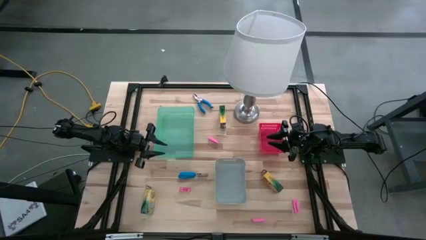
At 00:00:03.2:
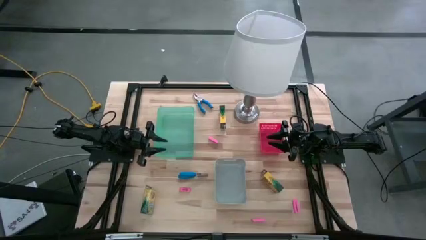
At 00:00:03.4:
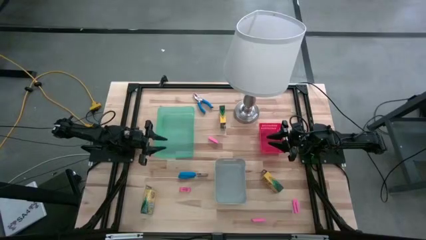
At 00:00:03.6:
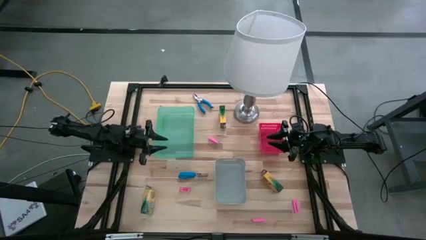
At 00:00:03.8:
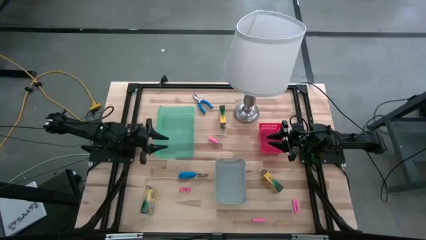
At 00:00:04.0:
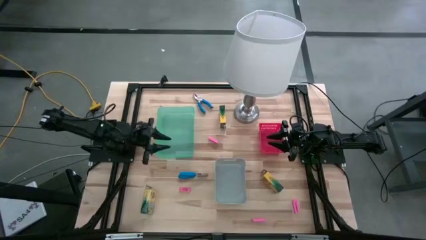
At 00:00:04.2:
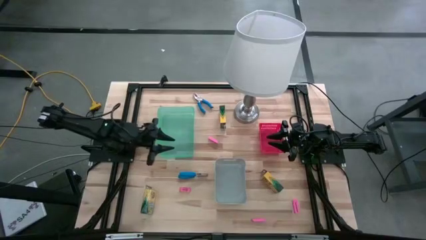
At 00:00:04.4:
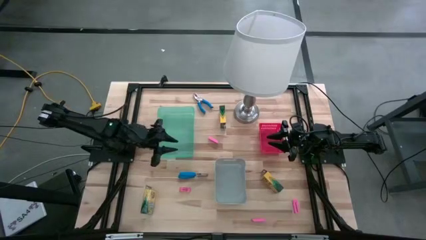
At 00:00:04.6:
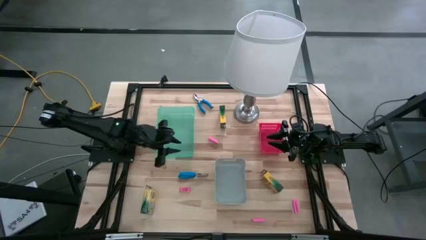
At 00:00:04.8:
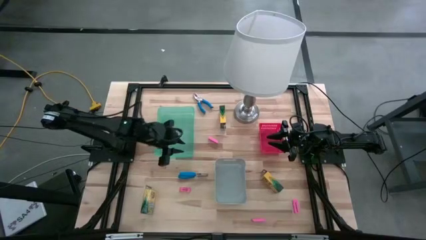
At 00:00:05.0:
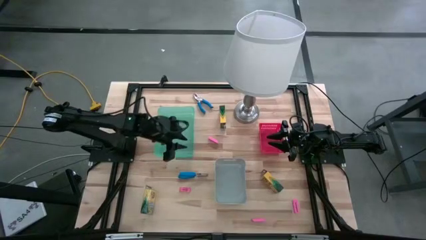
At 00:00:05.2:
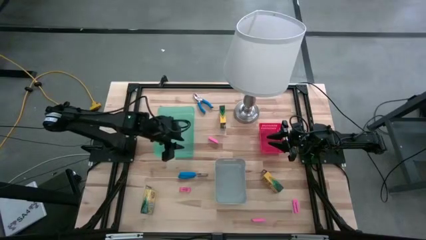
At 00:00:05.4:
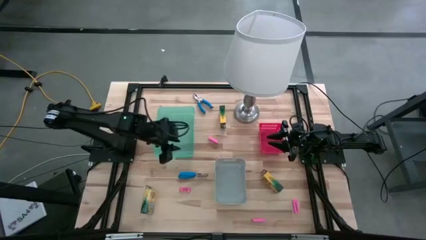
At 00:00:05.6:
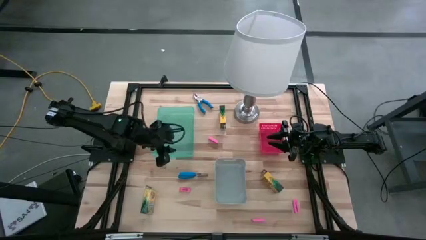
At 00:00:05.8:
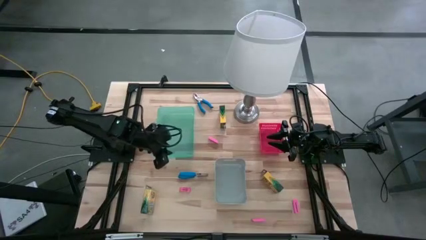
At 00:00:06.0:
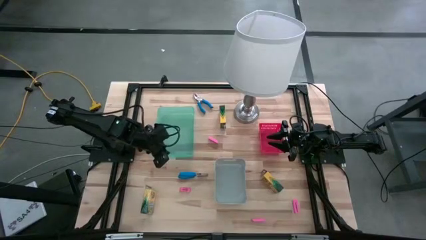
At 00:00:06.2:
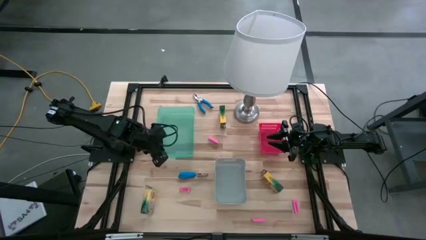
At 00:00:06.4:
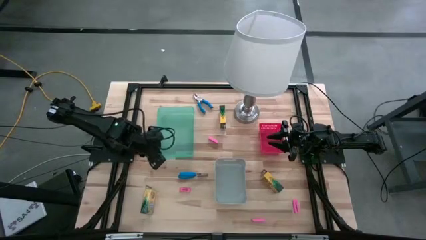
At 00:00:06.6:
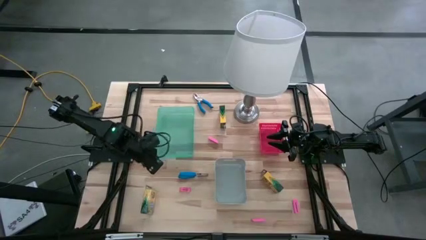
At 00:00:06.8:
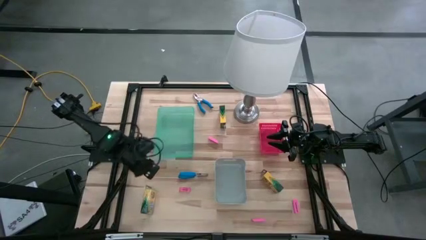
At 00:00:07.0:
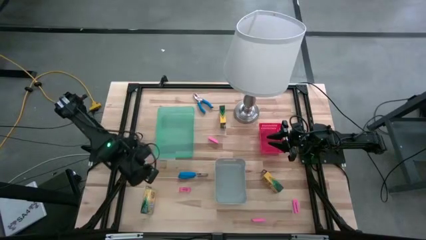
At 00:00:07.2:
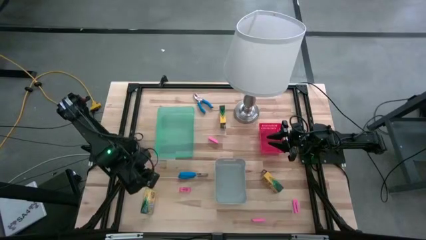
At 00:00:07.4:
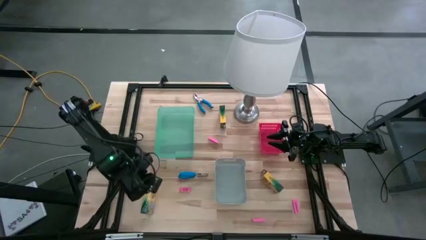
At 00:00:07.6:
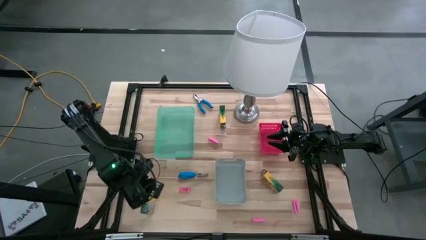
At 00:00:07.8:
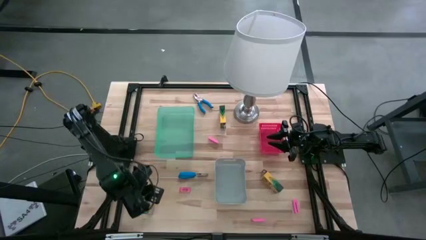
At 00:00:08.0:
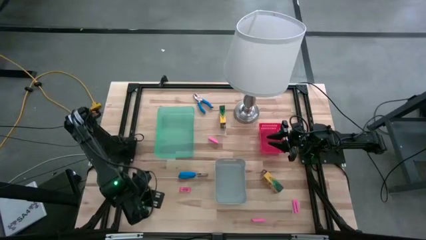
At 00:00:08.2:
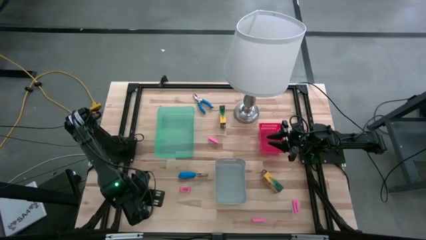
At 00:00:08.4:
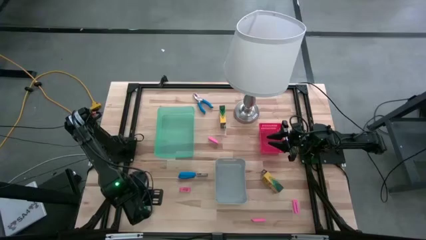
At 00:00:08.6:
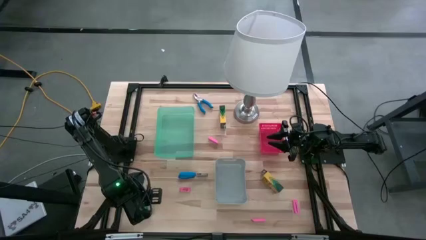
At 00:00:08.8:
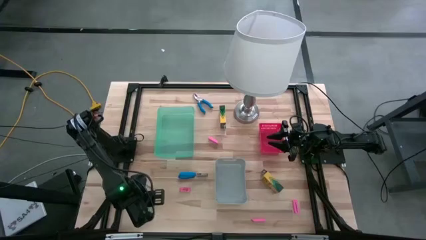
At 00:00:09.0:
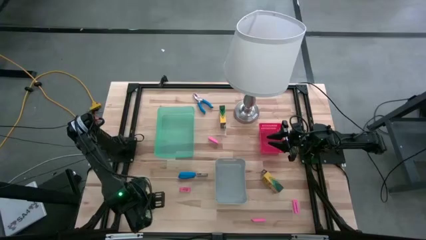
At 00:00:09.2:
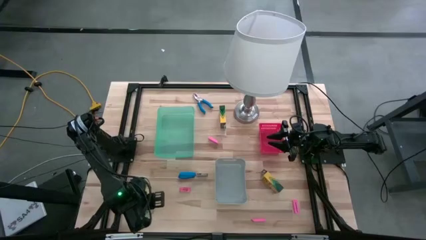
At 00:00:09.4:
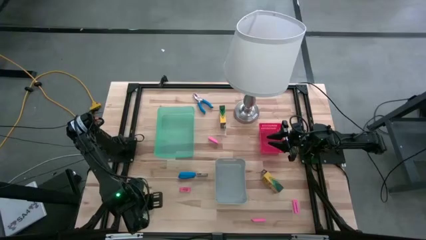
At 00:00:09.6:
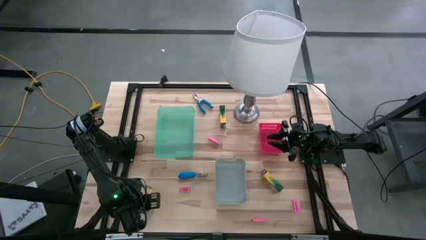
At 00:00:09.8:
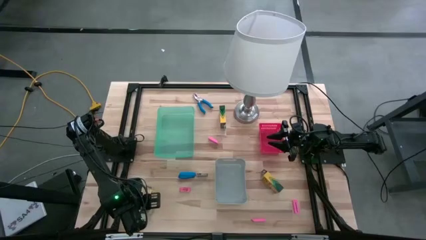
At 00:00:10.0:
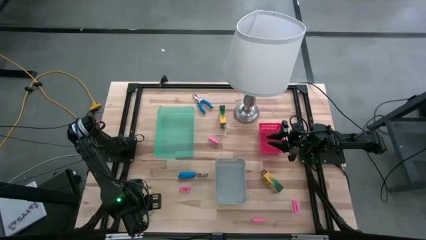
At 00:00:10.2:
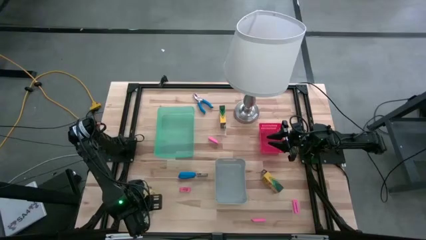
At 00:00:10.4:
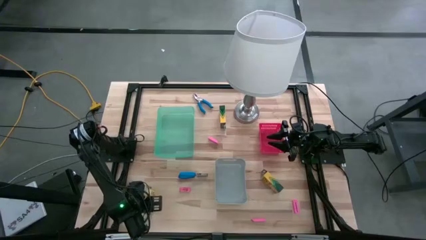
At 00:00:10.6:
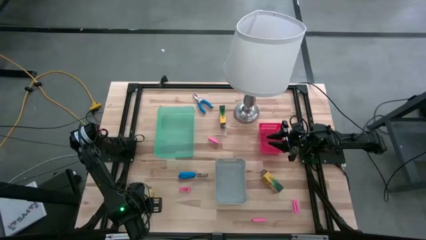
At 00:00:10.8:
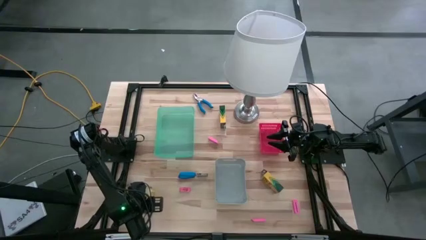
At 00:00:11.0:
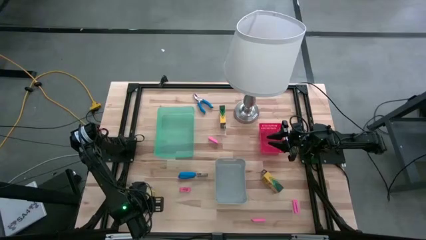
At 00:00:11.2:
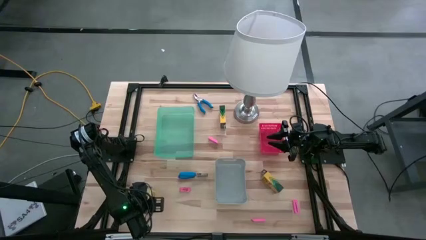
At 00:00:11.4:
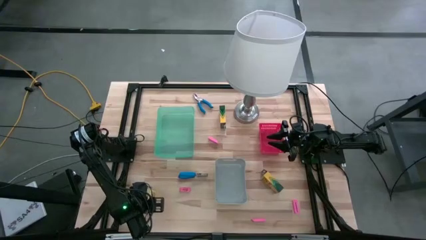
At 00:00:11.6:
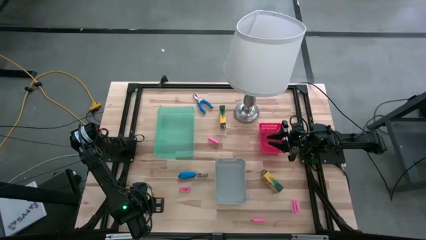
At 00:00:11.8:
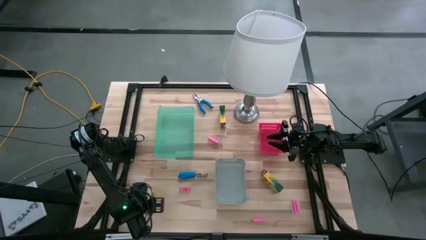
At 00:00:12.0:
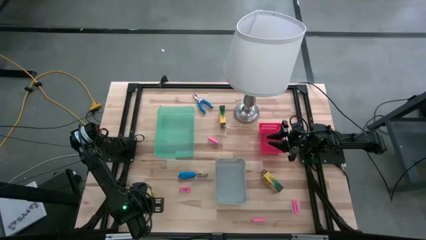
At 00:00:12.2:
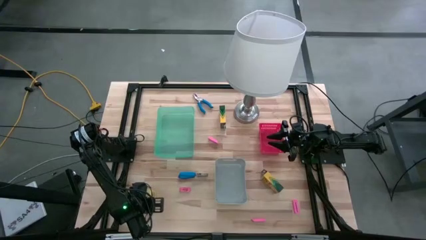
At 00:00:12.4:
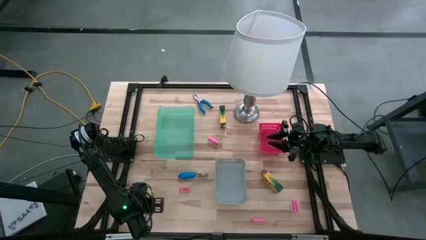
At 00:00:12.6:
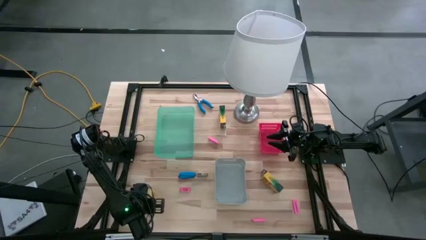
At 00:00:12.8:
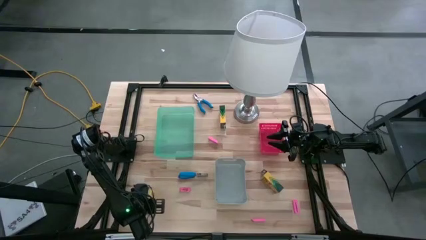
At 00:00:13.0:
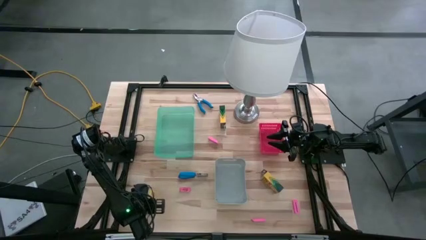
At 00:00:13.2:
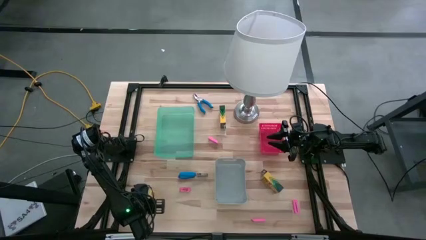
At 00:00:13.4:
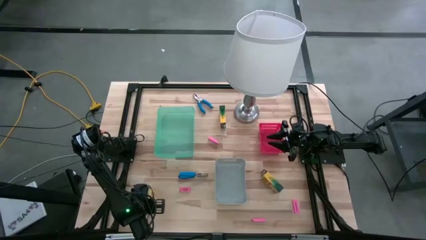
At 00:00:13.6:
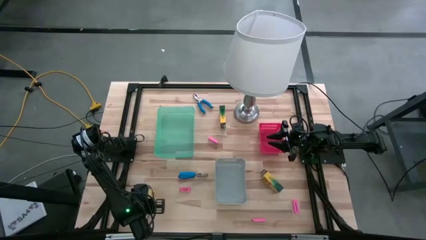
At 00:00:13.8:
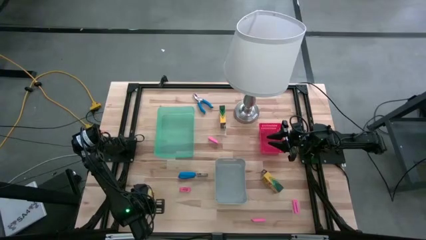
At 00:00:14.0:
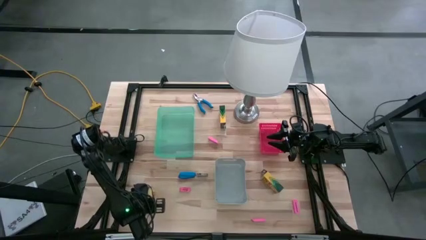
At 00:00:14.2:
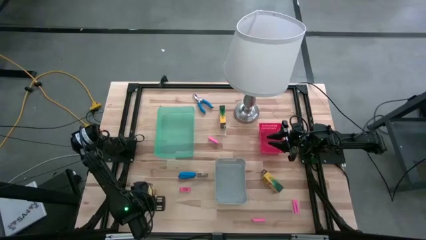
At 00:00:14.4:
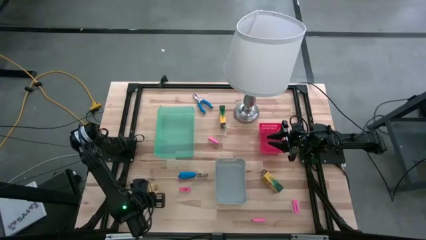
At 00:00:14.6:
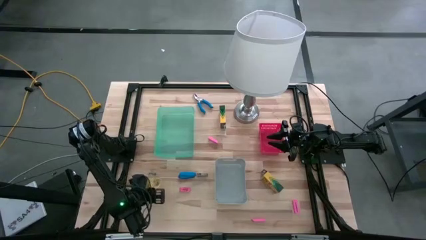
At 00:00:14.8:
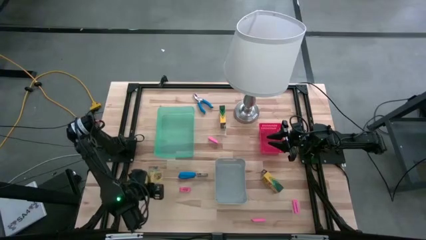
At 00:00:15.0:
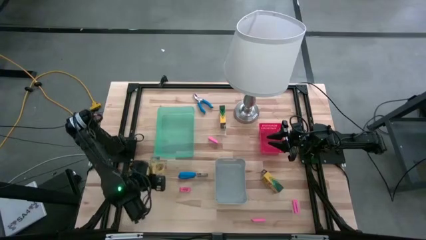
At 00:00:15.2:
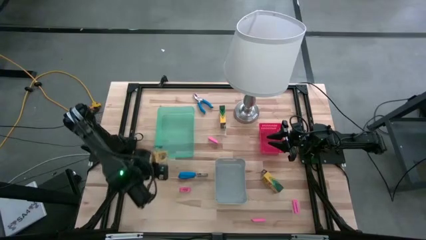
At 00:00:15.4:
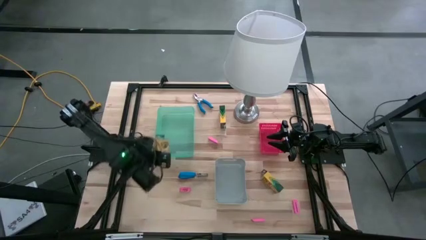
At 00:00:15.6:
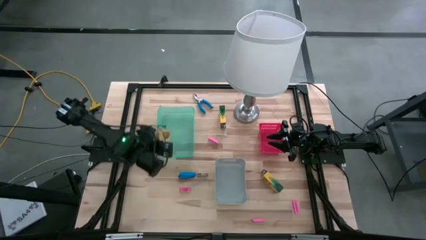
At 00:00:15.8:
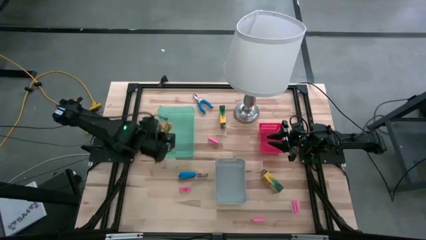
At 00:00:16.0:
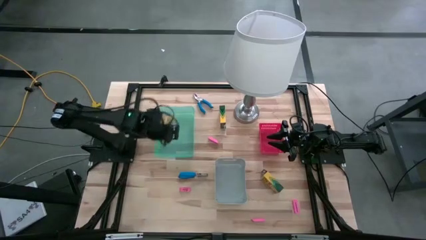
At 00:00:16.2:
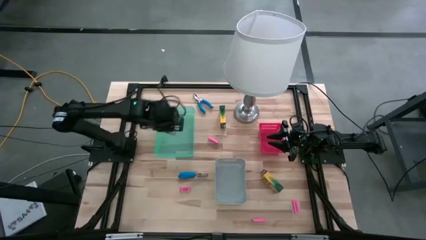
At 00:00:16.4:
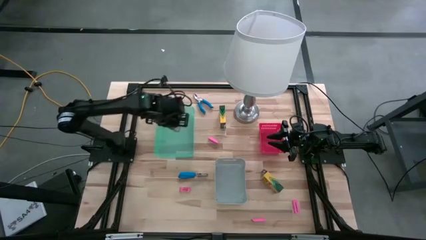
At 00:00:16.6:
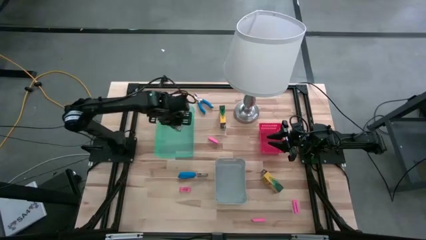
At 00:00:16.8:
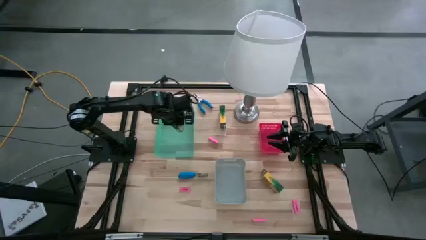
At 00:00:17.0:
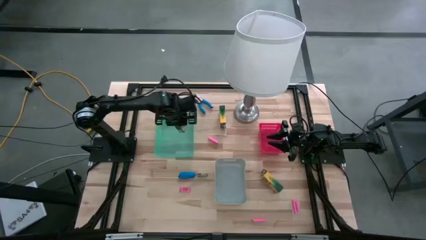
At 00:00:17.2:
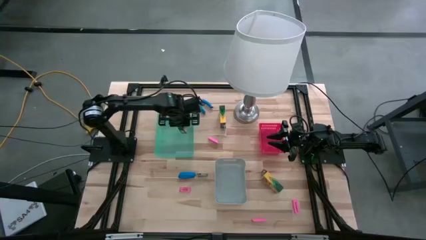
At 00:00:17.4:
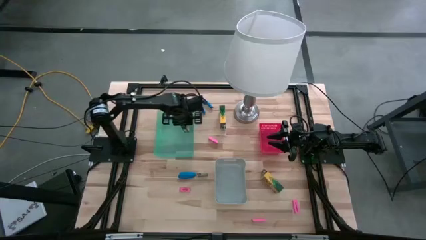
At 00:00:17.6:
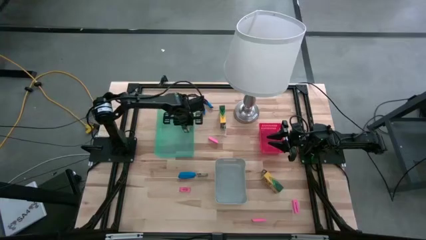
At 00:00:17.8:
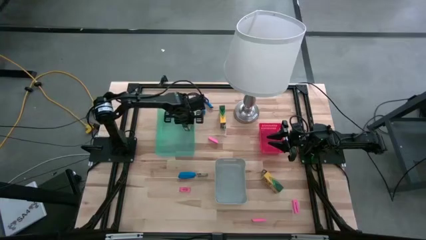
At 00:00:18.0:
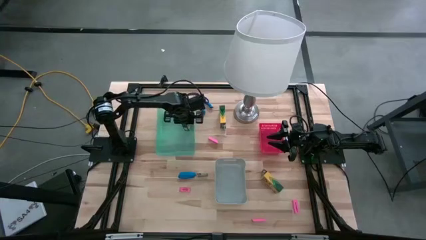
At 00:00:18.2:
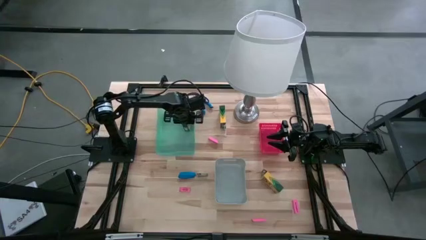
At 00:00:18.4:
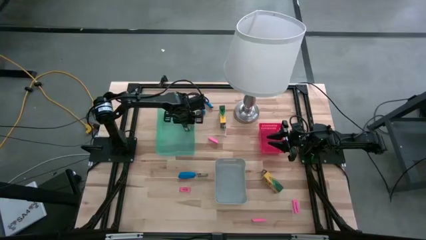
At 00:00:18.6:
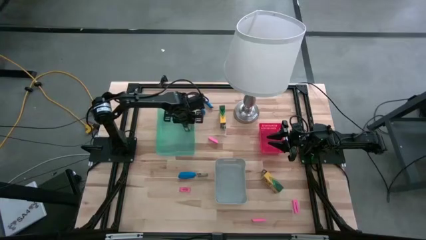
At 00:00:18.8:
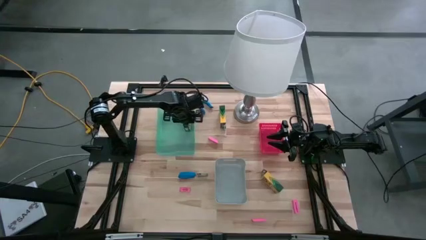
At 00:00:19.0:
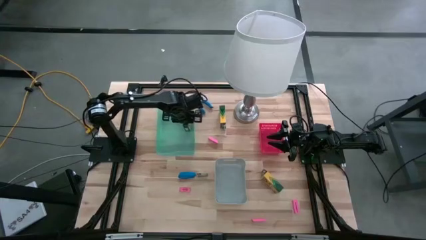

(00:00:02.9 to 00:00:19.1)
Task: Pick & Place School Supplies
Put the crayon box into the green bin
